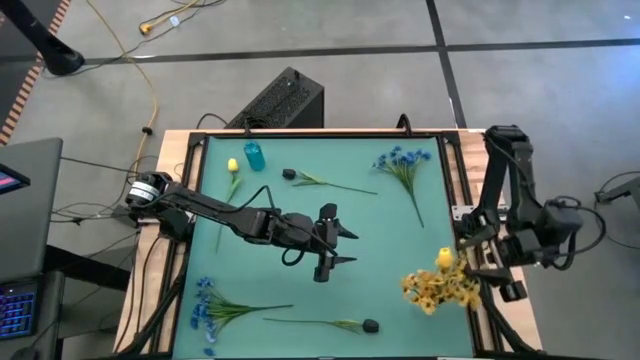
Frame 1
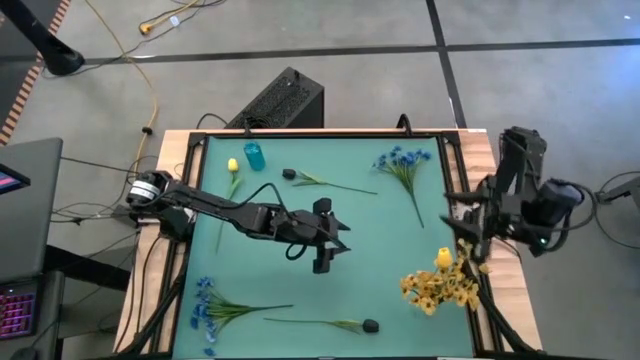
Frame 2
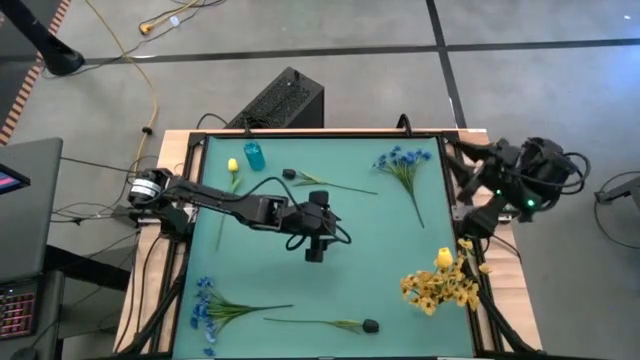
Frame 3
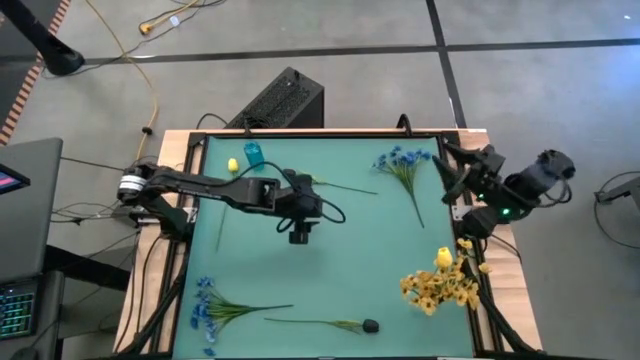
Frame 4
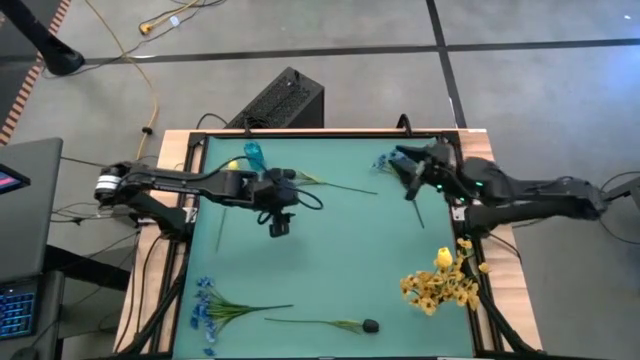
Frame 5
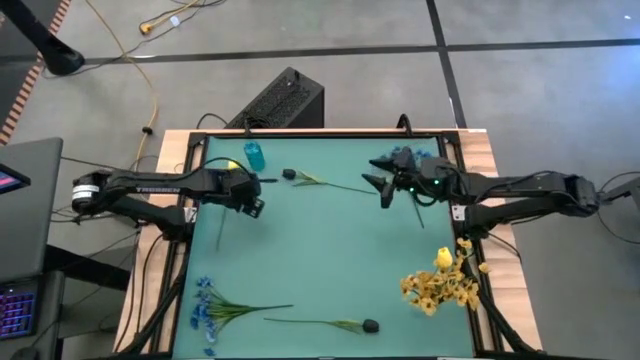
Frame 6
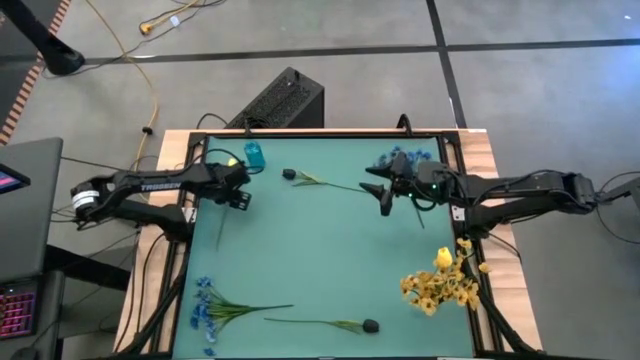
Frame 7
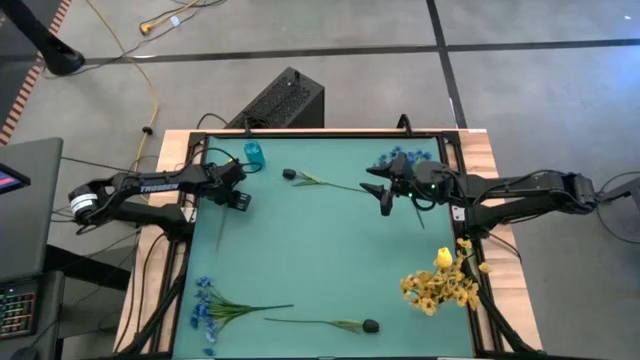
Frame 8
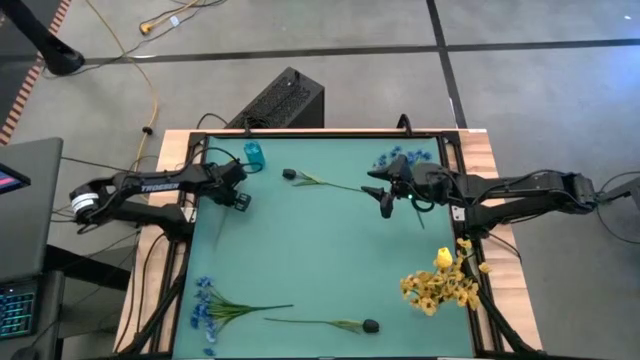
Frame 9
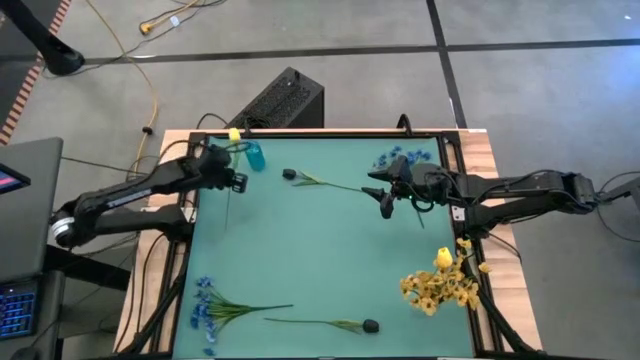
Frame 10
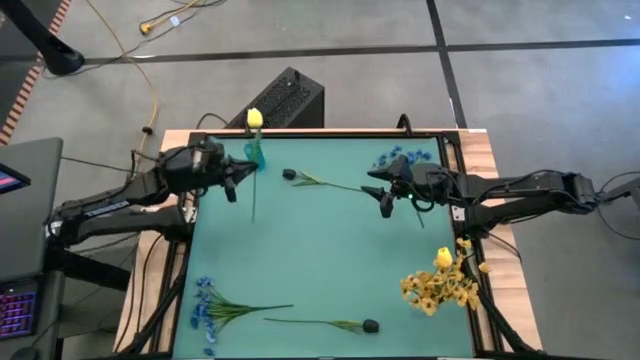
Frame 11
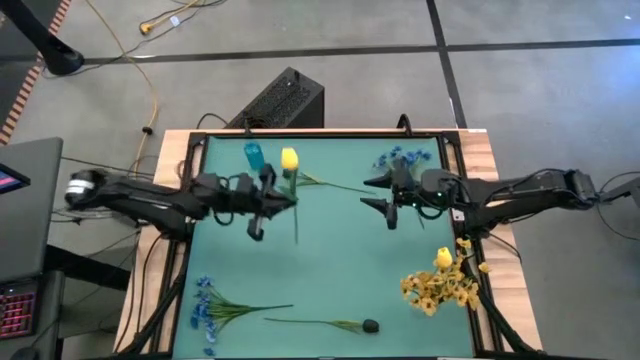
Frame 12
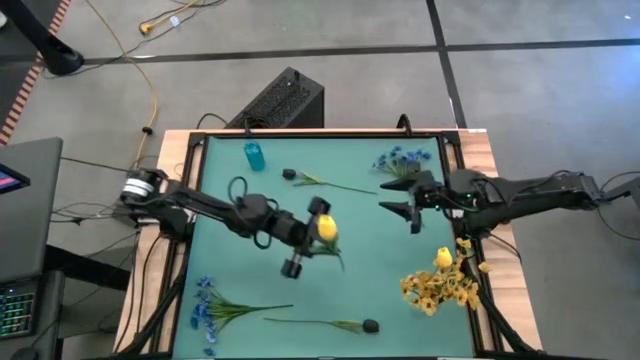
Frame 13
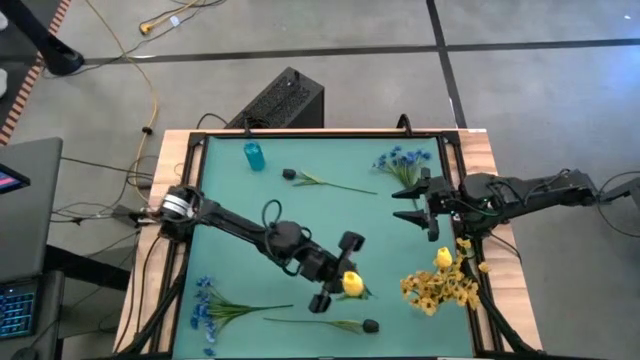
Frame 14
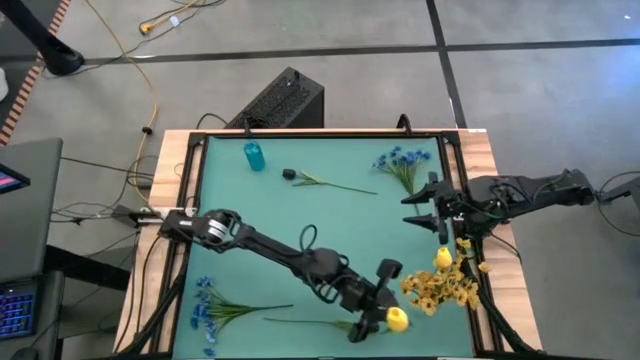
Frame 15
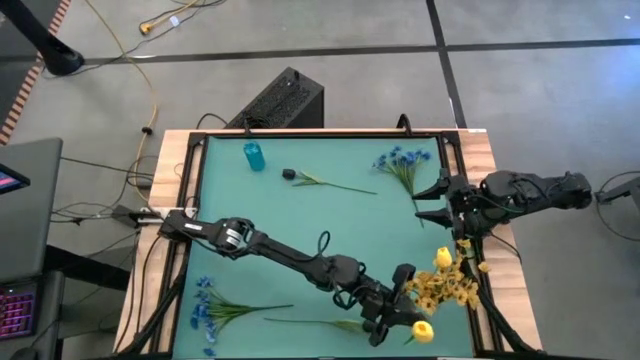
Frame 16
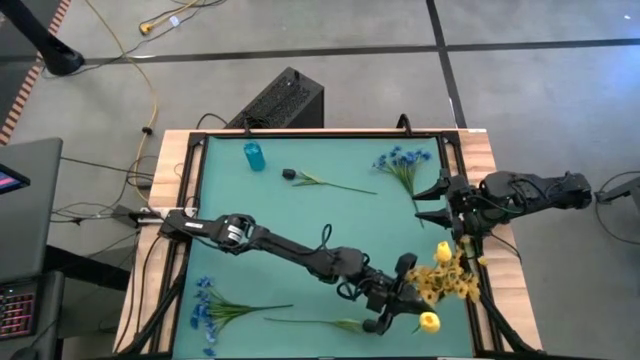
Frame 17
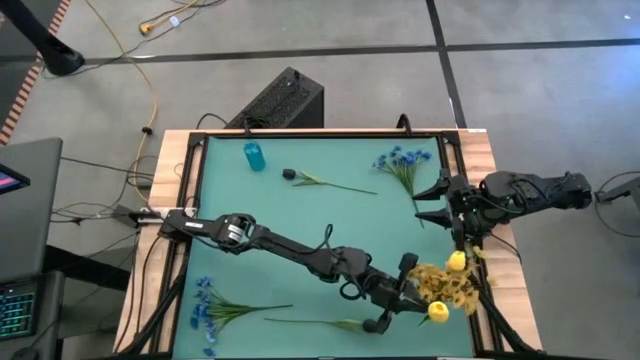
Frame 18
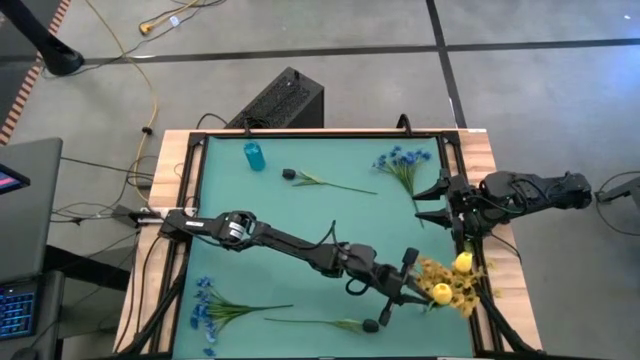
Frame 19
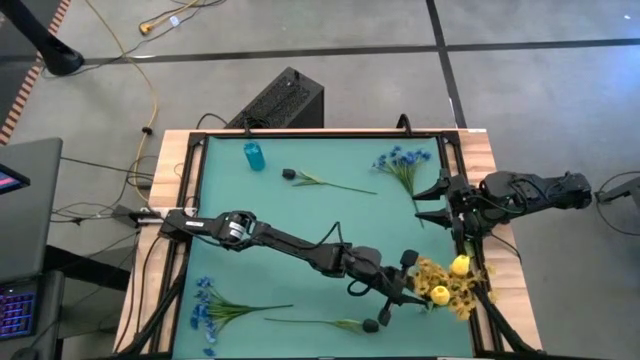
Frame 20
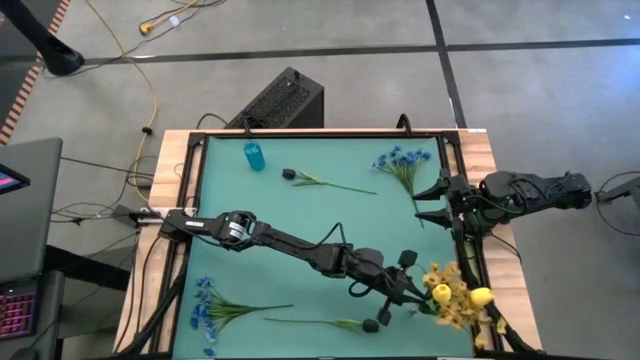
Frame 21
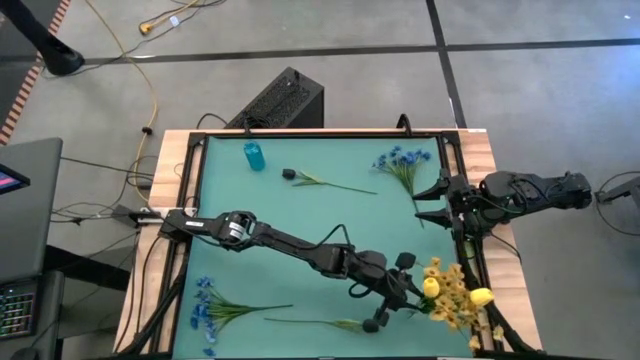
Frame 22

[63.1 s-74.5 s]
Task: Sort flowers into vase by color
Put the yellow tulip into the transparent vase

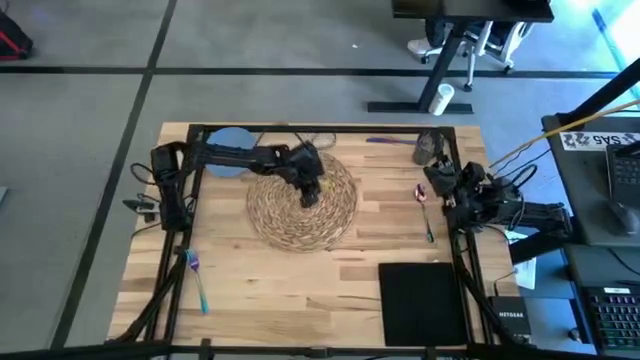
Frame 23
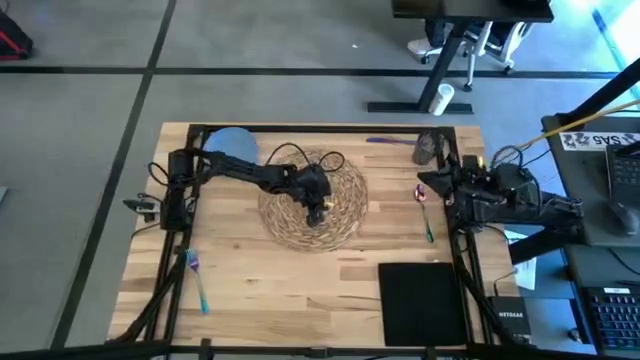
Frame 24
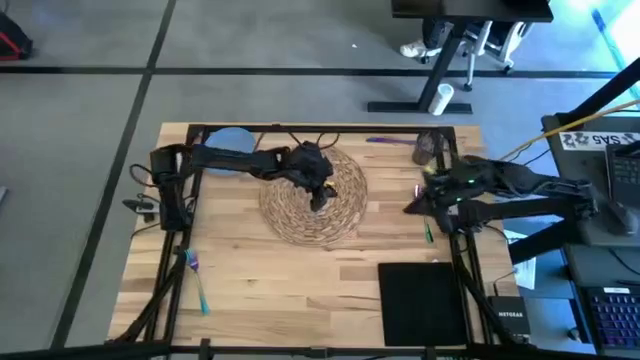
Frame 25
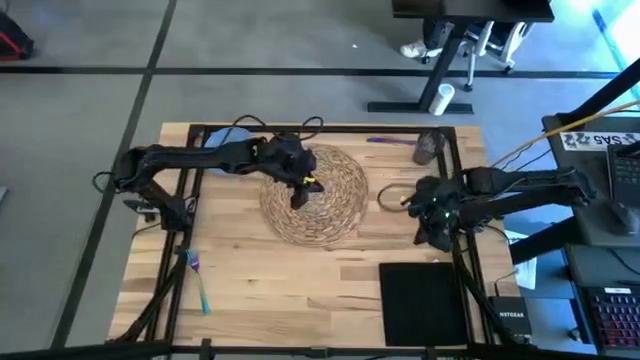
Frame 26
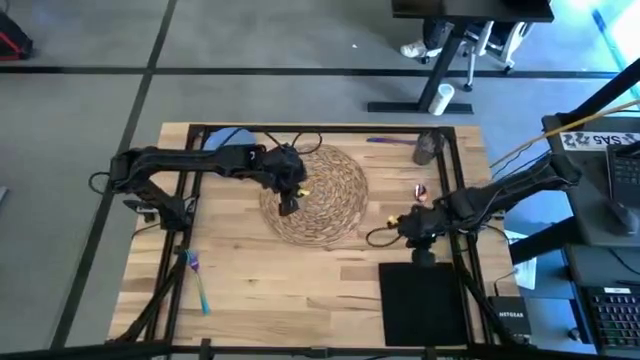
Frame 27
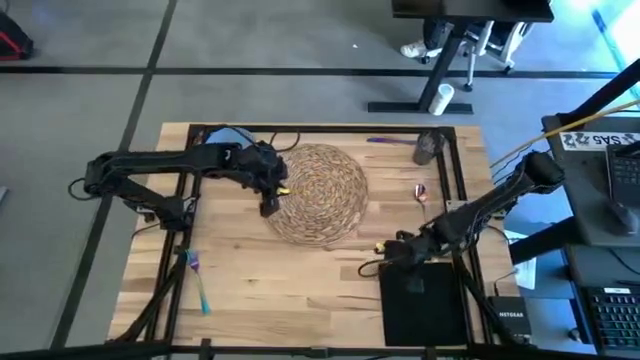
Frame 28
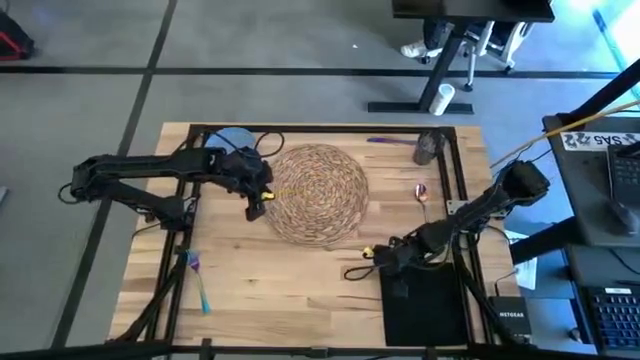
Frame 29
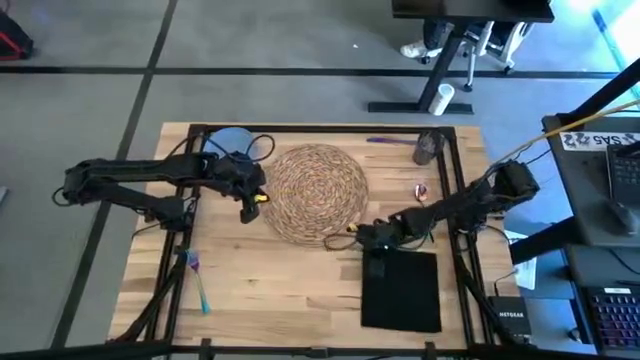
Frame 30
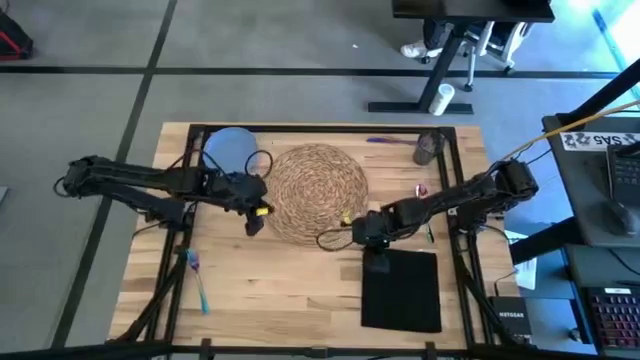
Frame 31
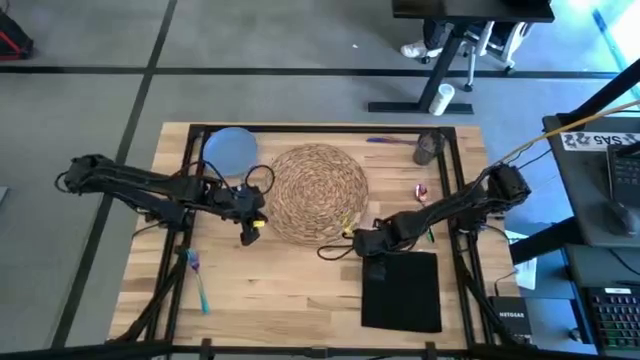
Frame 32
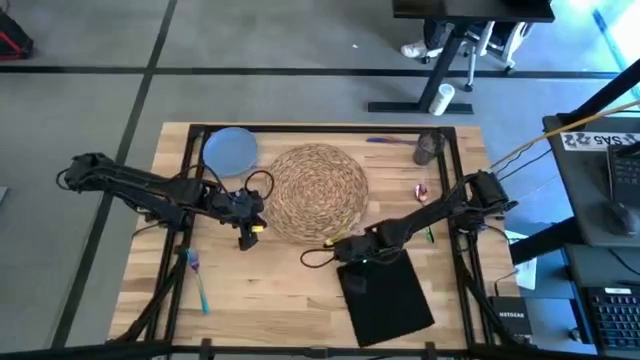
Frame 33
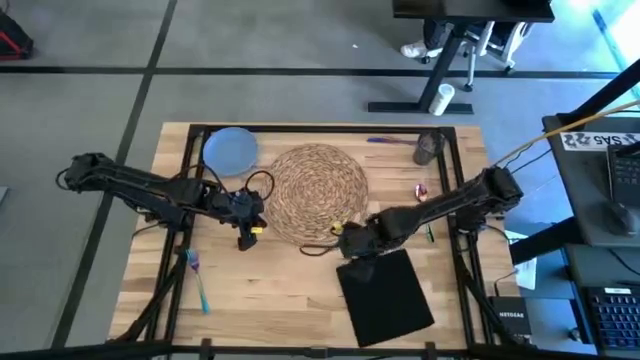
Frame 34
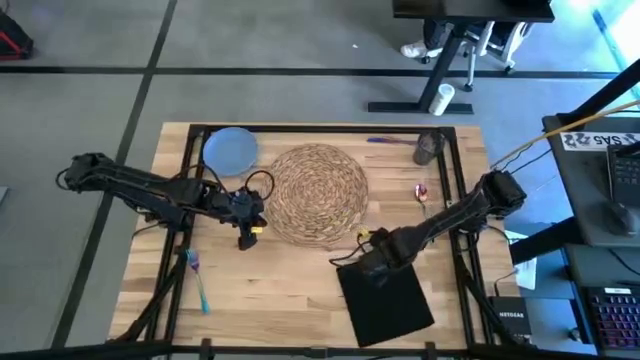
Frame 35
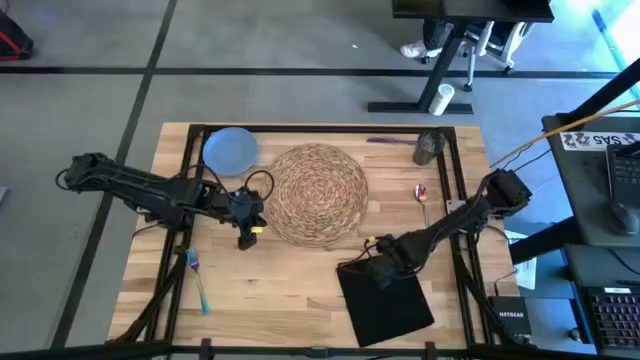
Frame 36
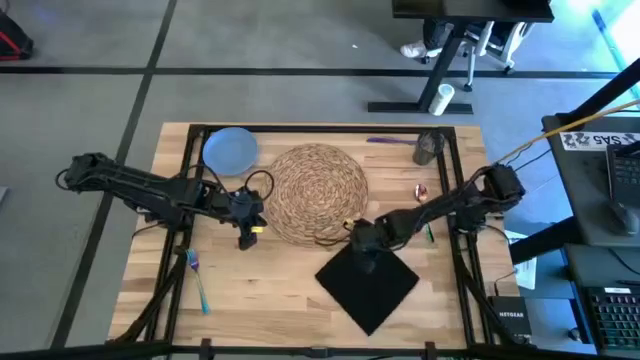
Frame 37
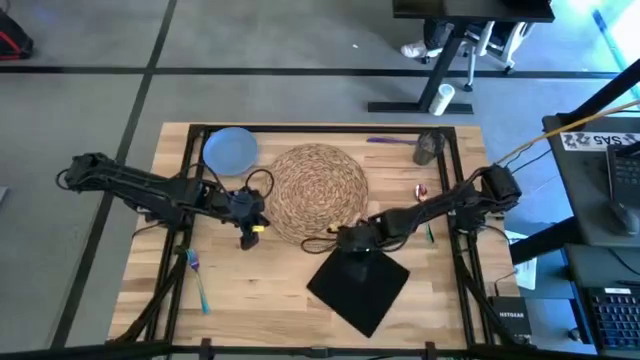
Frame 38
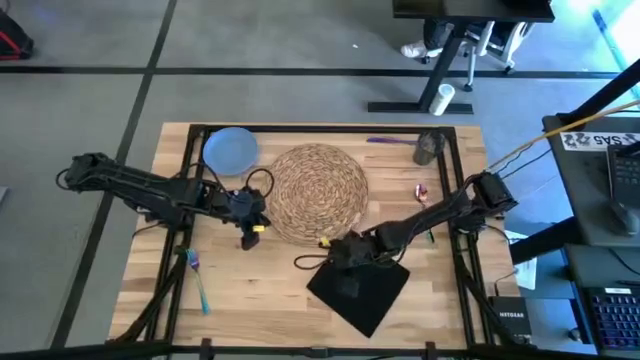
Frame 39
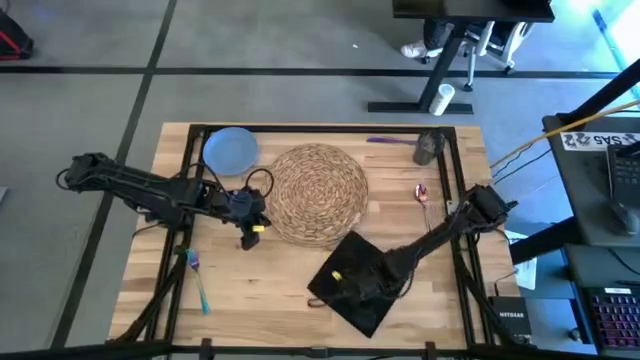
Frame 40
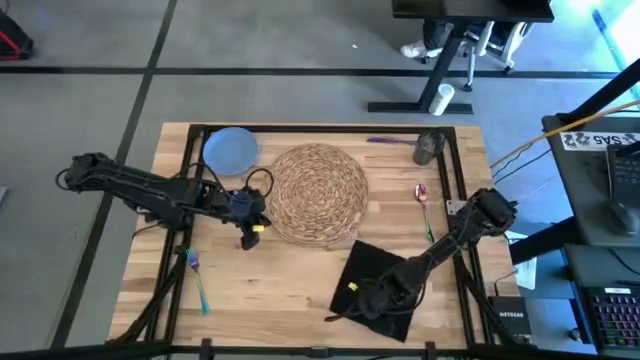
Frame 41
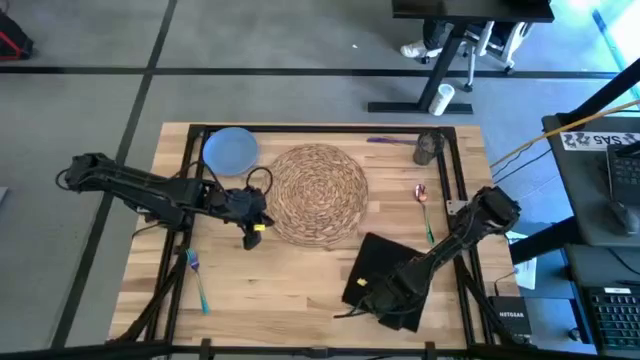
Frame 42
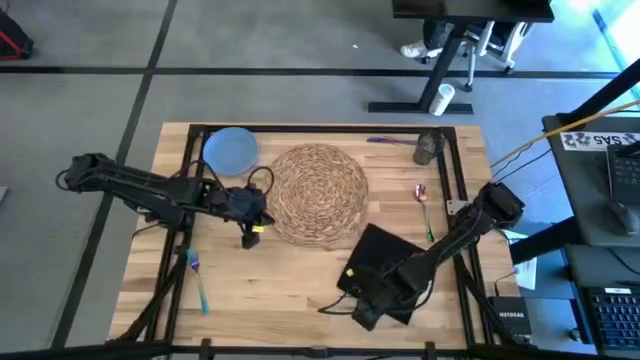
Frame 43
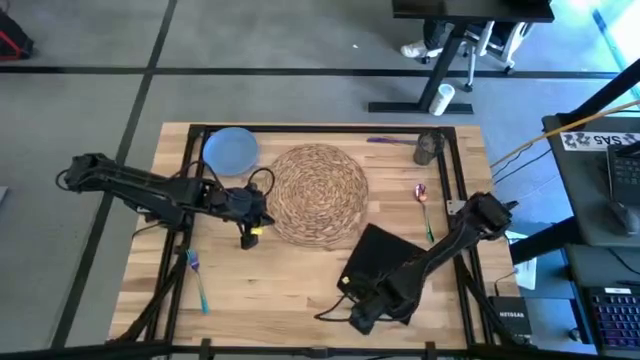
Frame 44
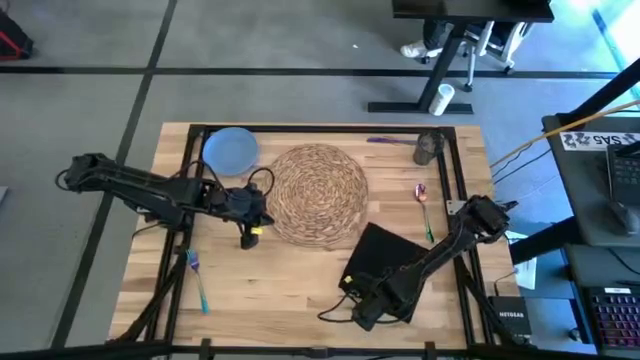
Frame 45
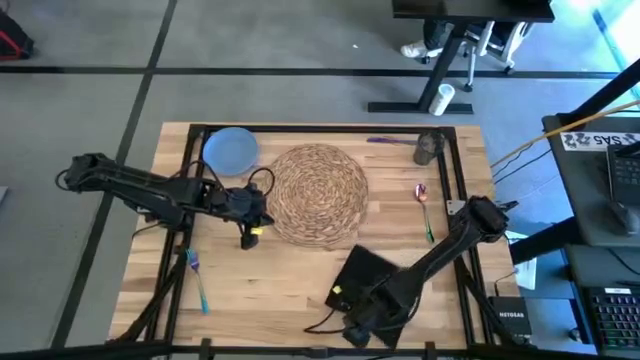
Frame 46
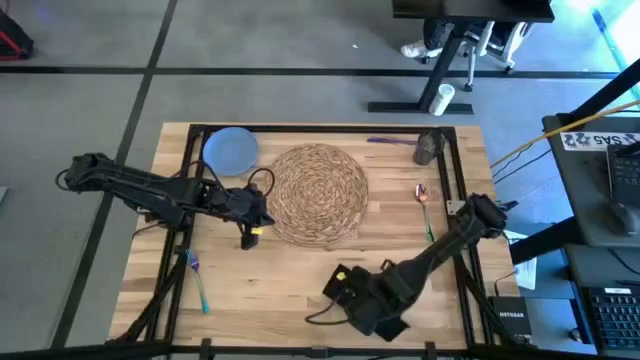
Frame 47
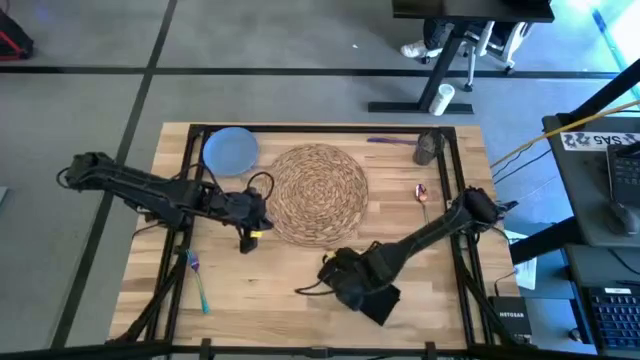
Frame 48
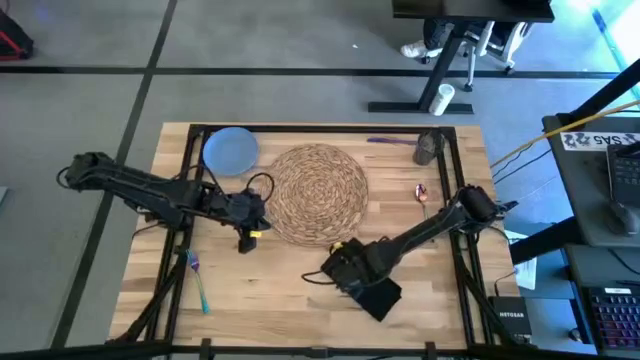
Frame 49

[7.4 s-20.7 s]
Task: Set table place
Fold the black table napkin on the table
